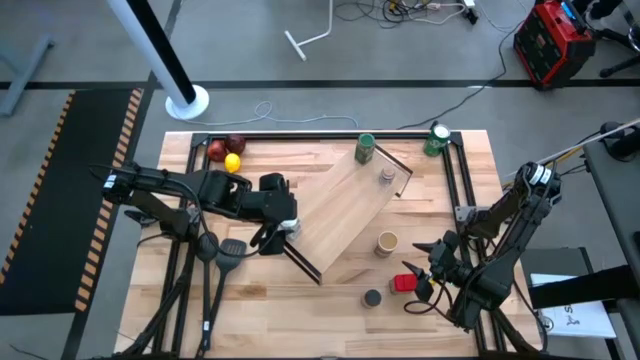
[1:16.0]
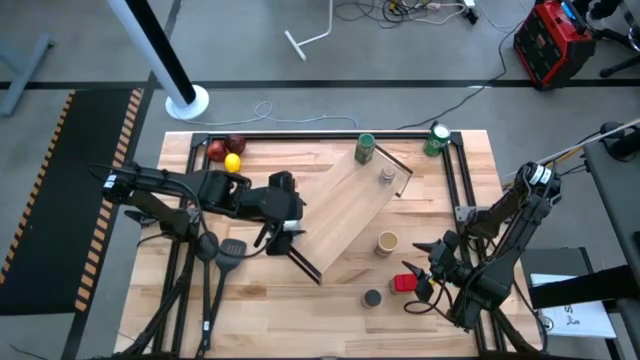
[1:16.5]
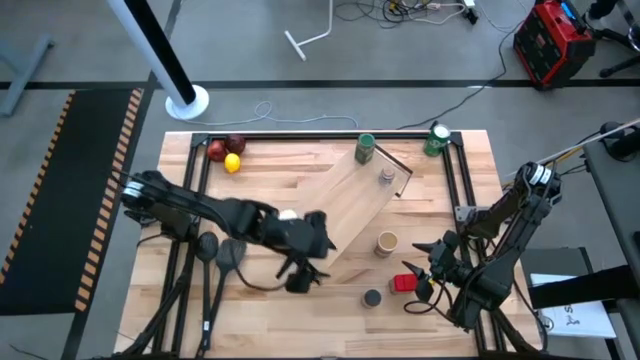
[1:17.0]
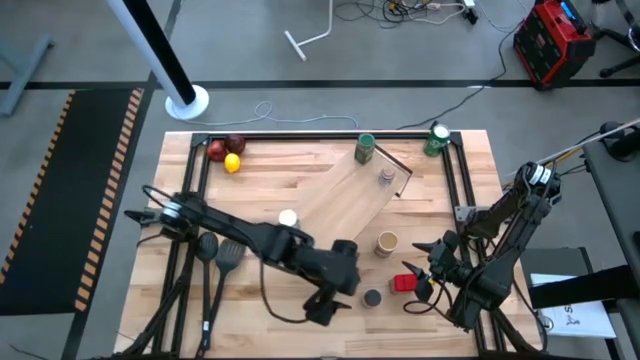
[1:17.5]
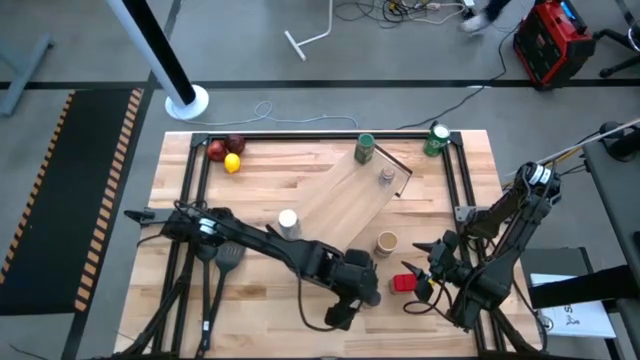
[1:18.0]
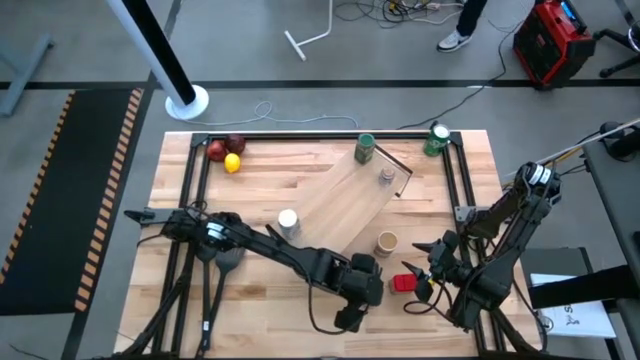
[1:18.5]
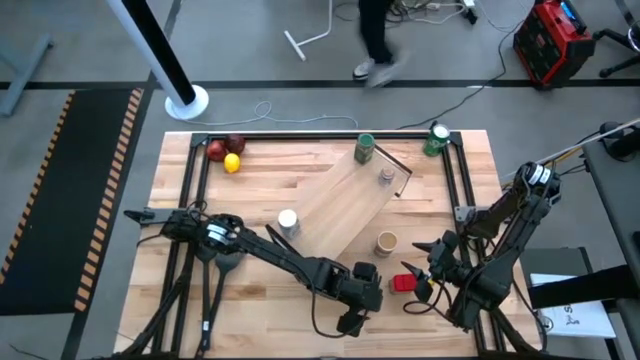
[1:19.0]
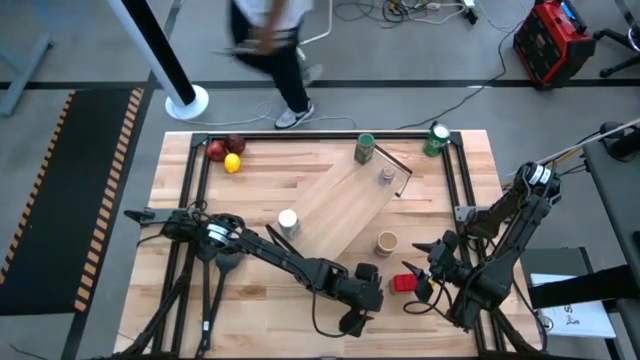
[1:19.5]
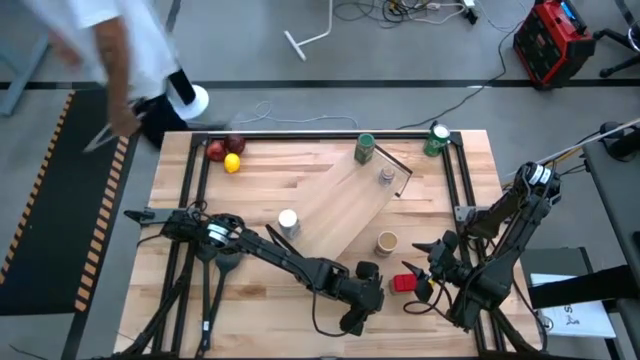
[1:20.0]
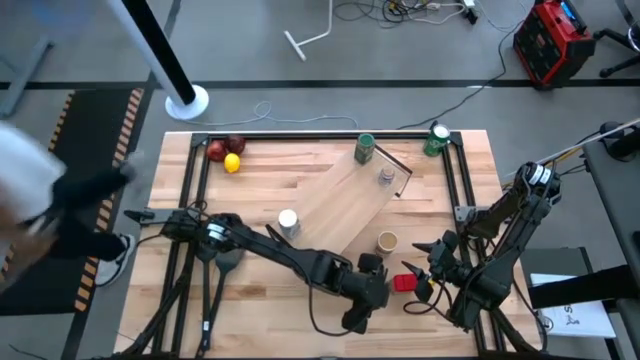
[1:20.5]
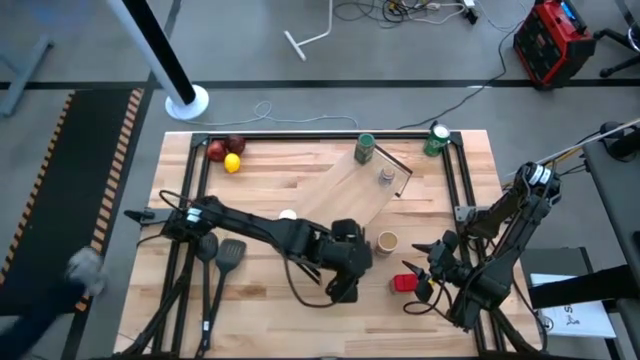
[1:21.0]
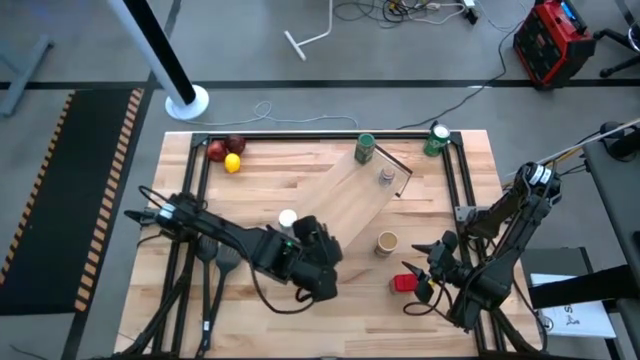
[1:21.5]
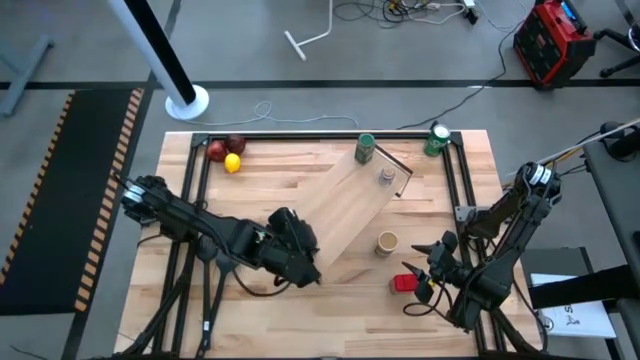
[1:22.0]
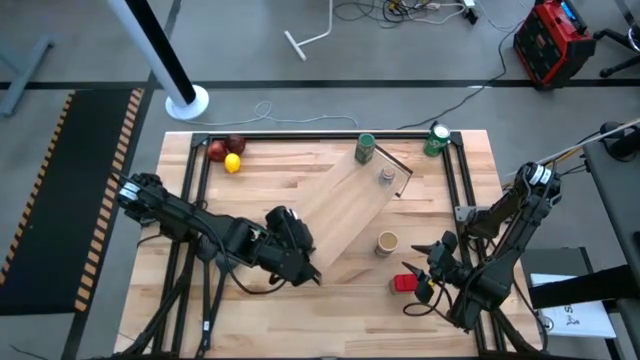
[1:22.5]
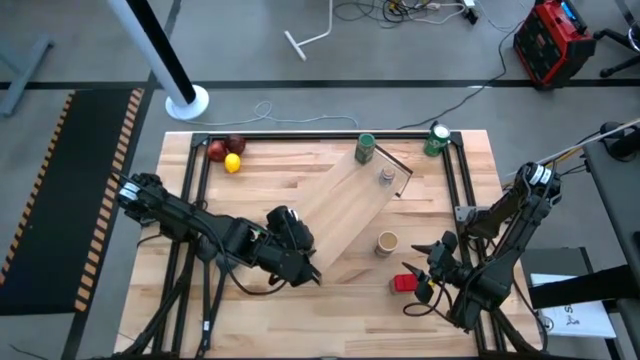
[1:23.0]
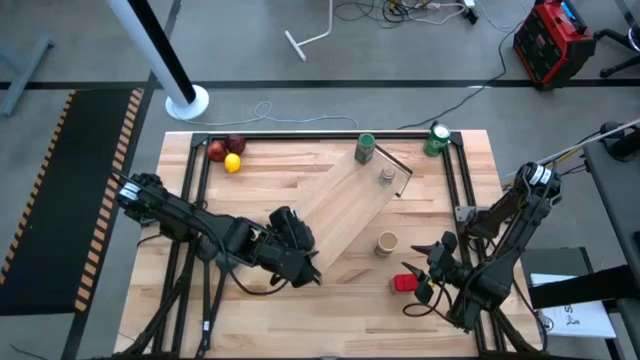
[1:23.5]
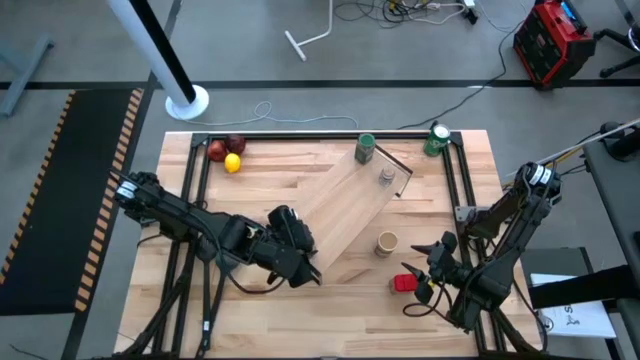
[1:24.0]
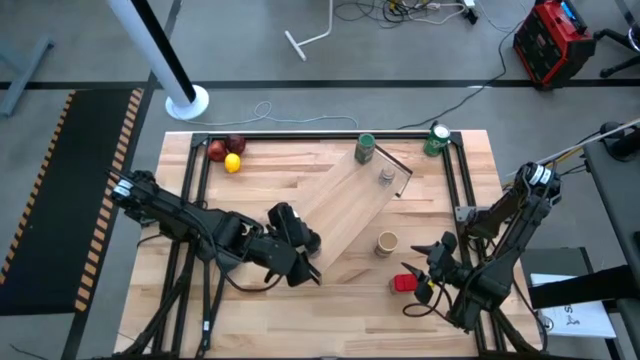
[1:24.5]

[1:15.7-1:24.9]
Task: Shelf spices
Put the black seasoning bottle on the shelf aligned with the white seasoning bottle

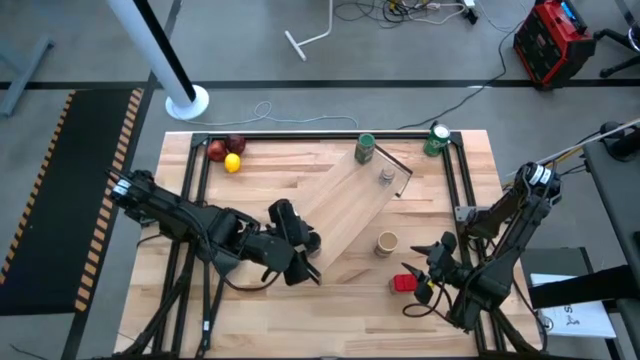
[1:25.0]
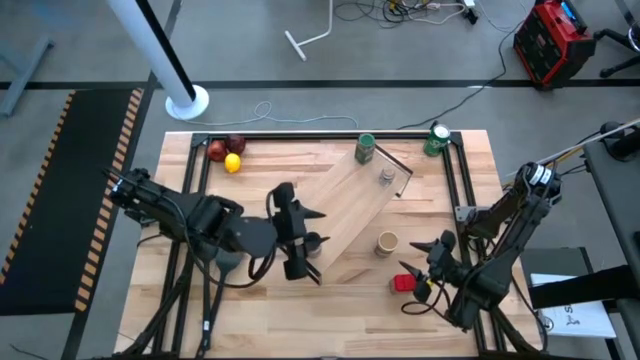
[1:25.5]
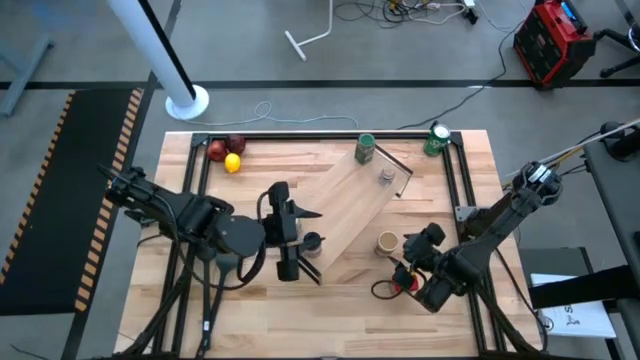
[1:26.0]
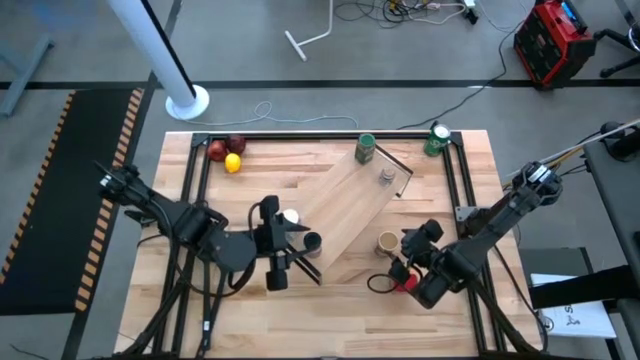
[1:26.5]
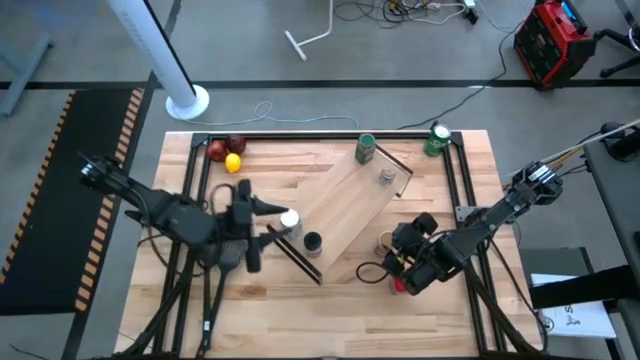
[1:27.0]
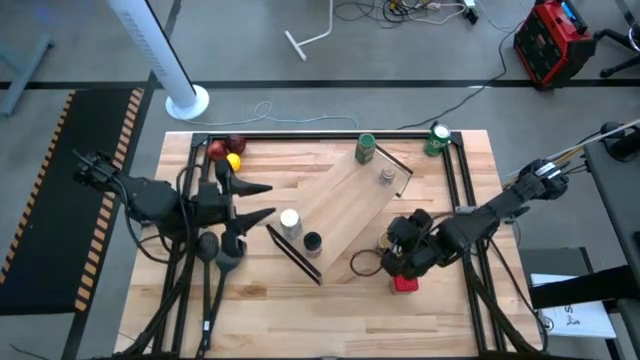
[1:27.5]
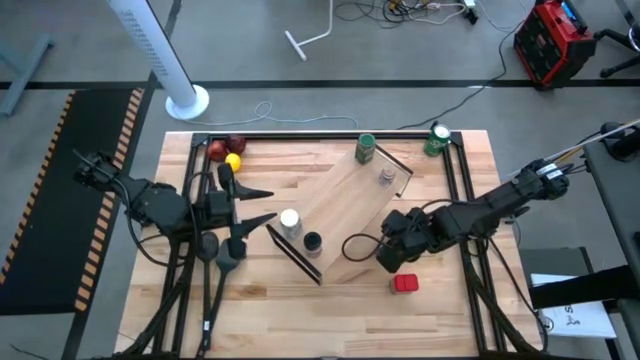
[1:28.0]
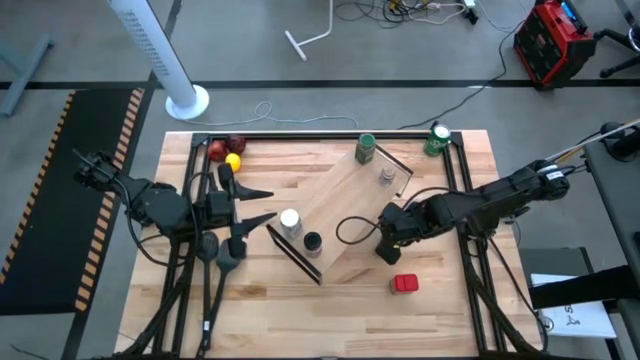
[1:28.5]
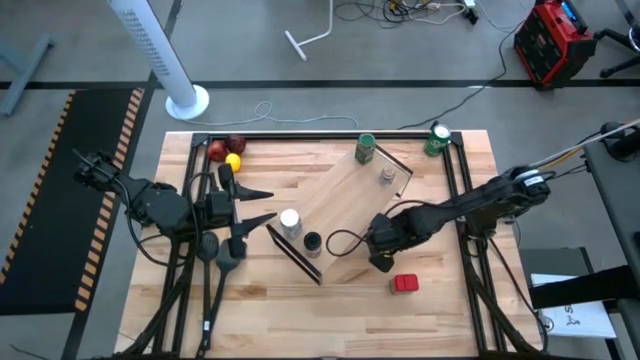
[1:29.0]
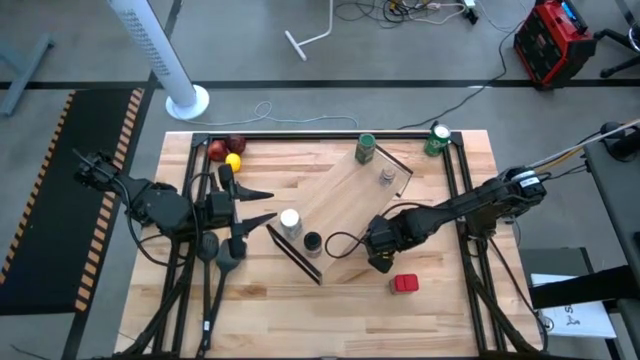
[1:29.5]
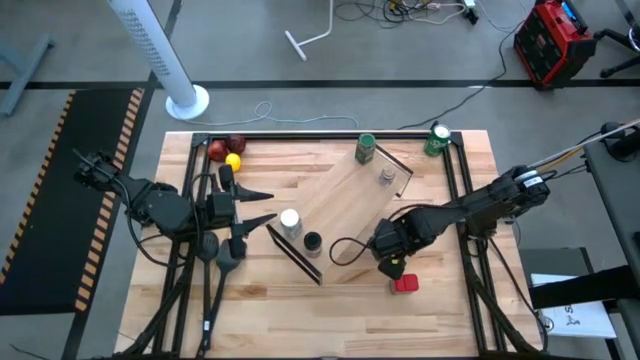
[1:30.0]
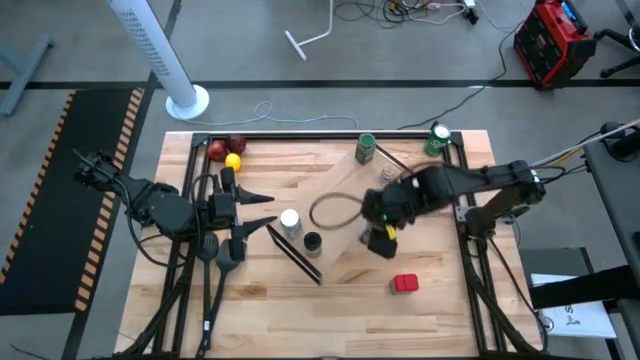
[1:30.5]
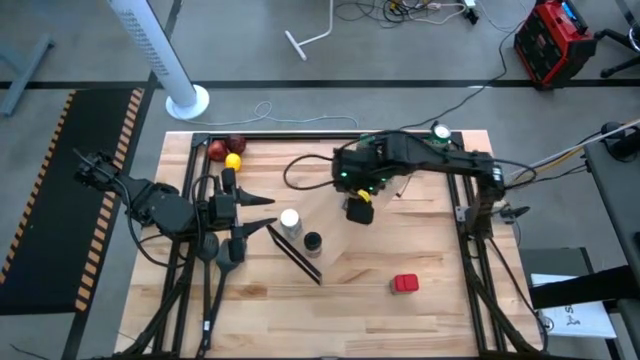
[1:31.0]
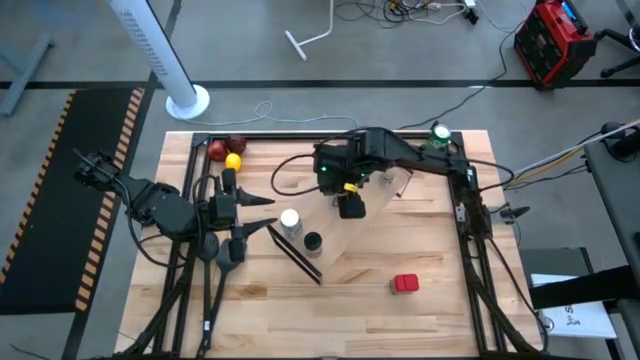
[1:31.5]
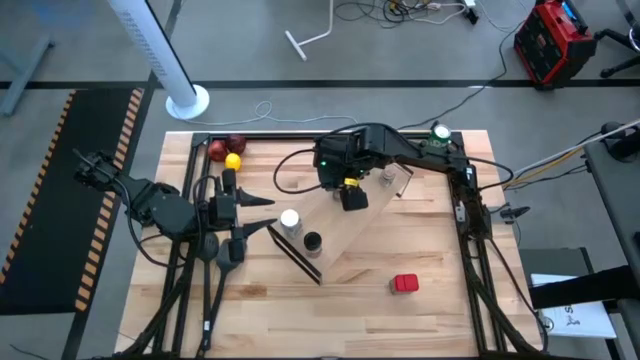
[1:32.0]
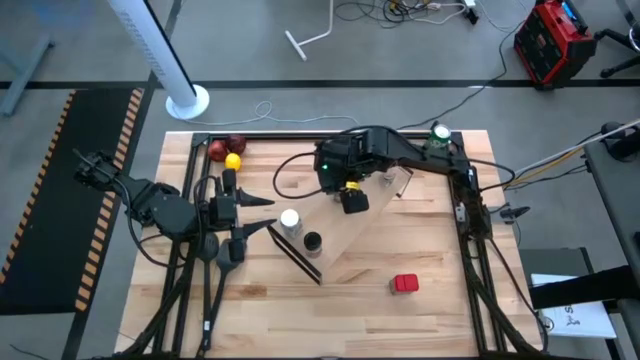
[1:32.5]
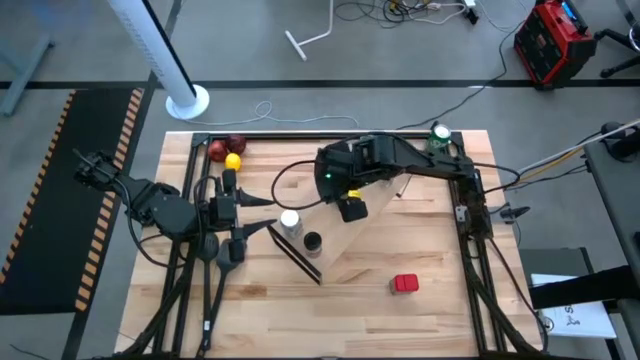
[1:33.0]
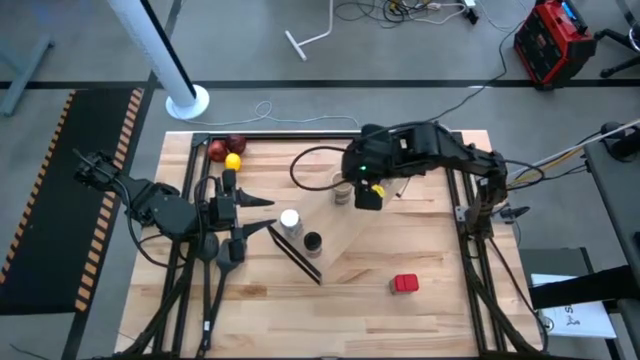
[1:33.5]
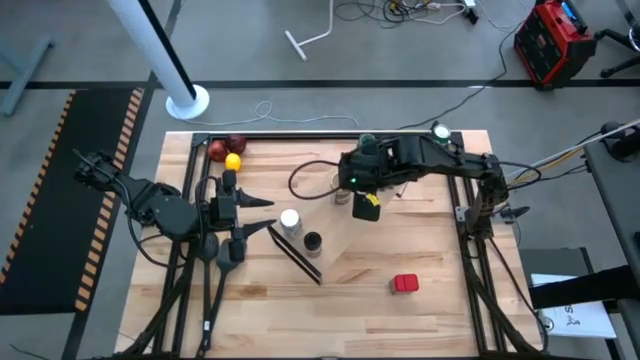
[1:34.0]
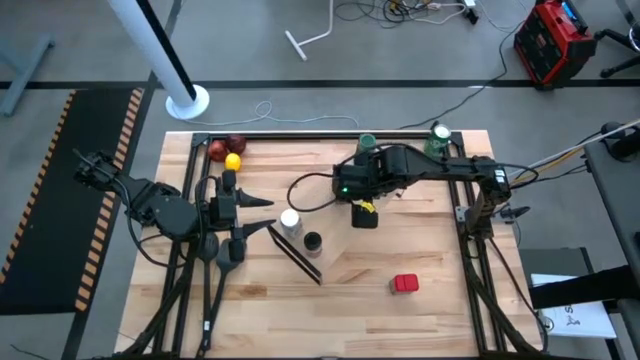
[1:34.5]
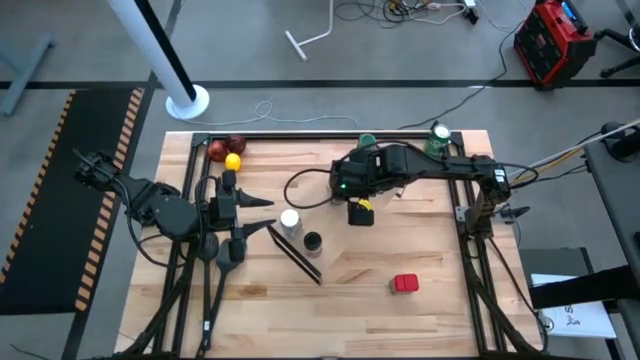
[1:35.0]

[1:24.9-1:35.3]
Put the golden seasoning bottle on the shelf

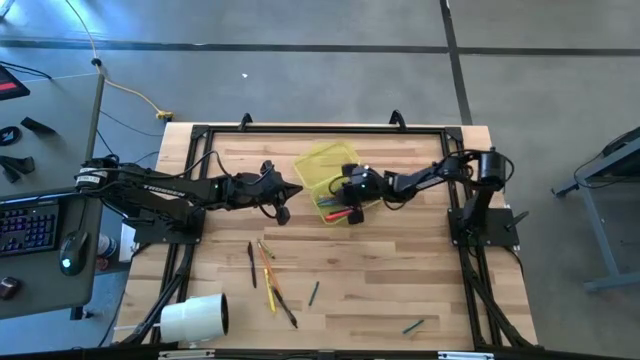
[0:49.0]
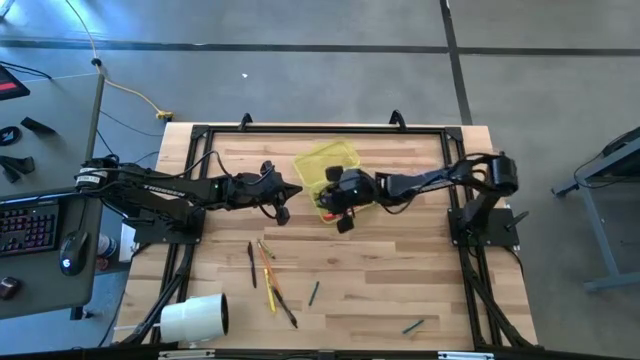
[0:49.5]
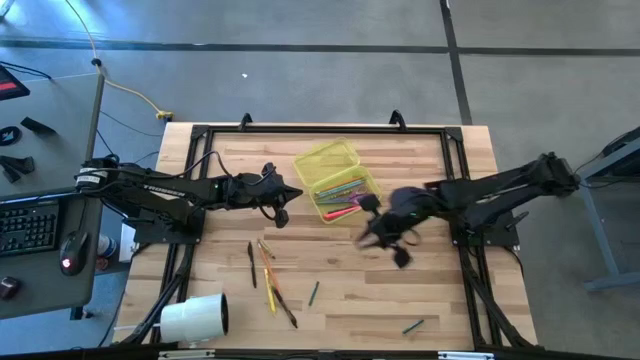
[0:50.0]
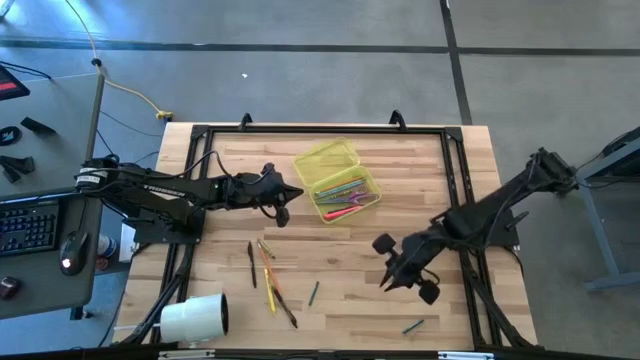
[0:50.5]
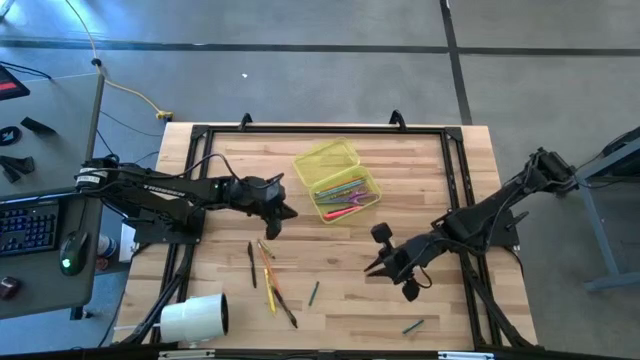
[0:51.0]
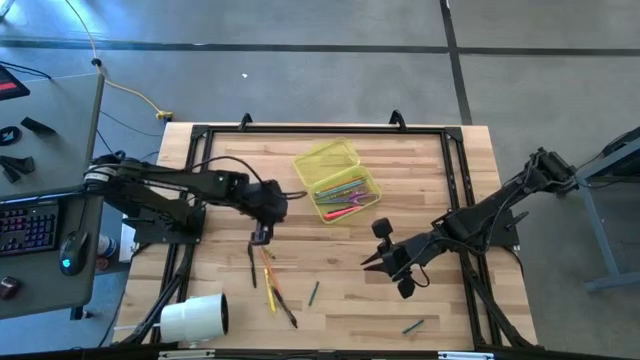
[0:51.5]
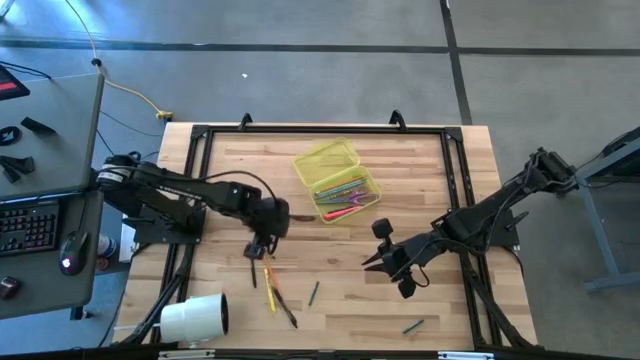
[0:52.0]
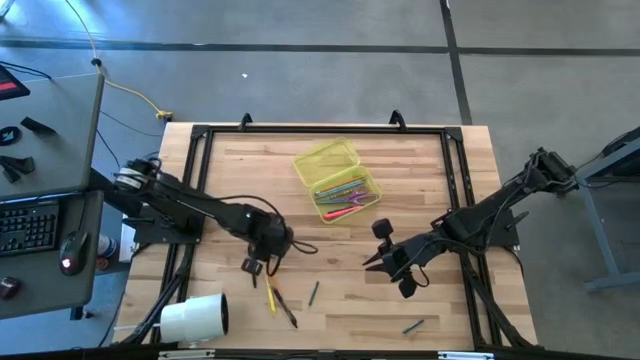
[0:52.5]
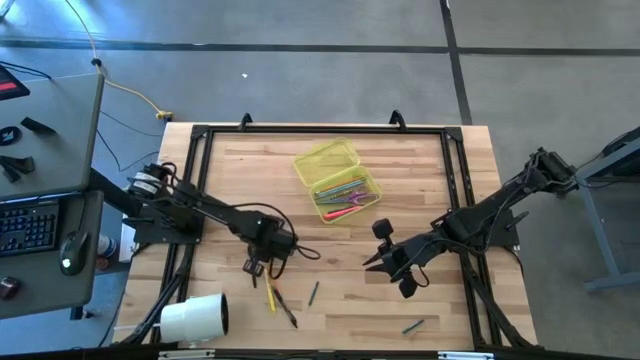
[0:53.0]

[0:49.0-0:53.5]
Task: Pick & place school supplies into a supply box
Put the left green crayon into the supply box
